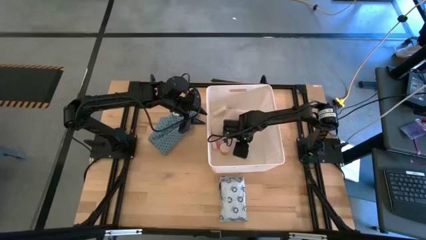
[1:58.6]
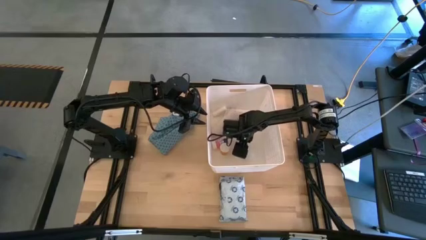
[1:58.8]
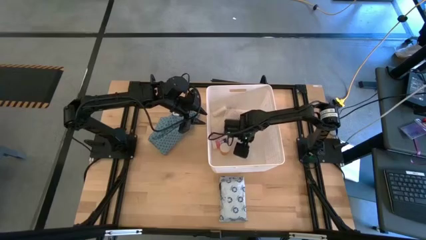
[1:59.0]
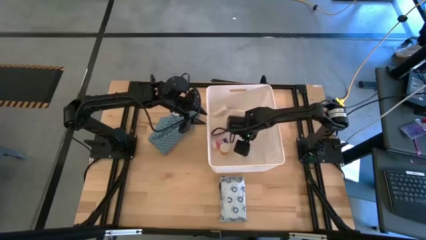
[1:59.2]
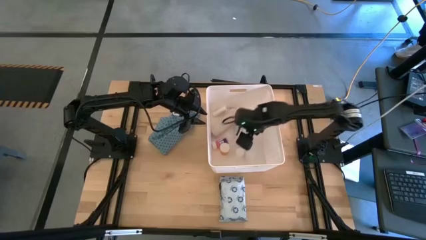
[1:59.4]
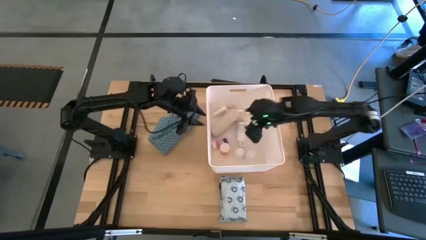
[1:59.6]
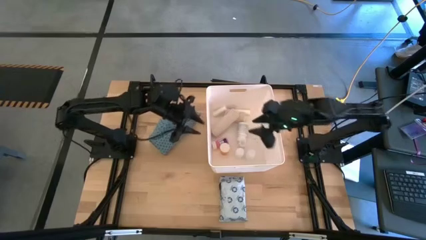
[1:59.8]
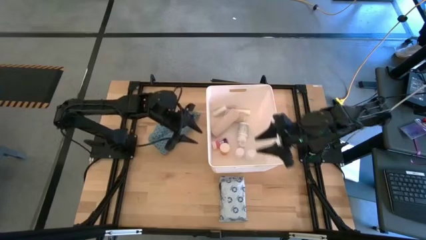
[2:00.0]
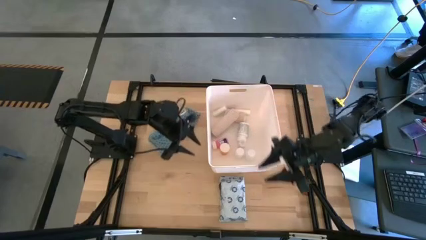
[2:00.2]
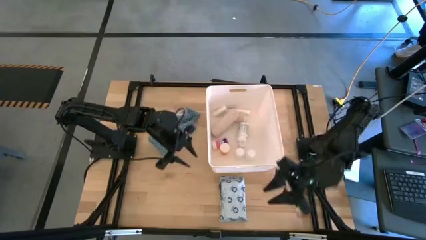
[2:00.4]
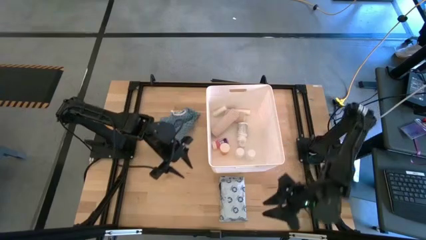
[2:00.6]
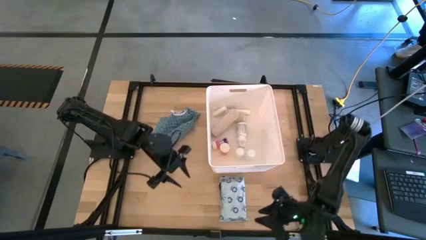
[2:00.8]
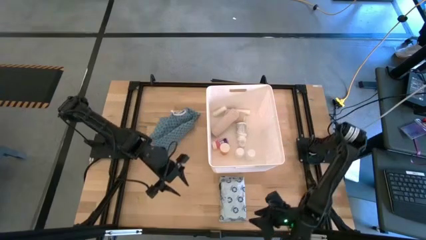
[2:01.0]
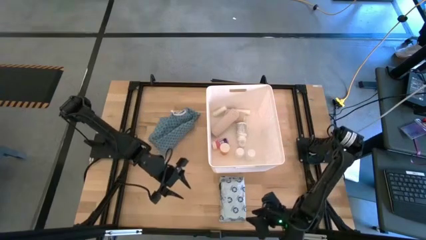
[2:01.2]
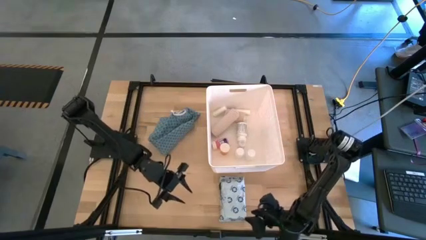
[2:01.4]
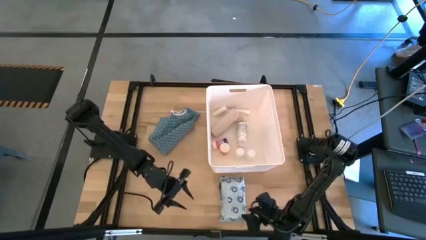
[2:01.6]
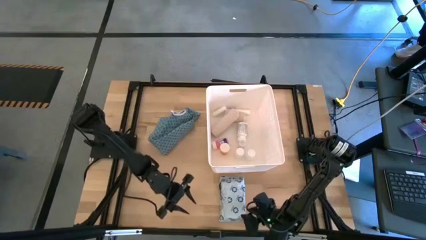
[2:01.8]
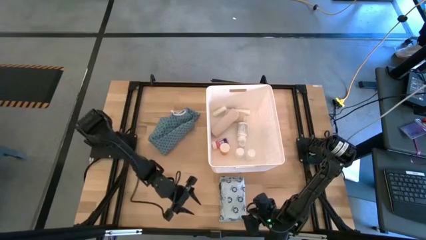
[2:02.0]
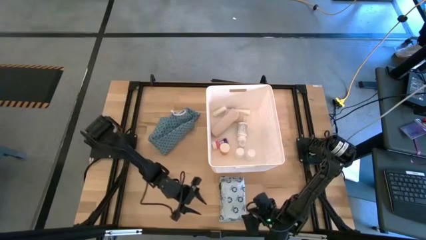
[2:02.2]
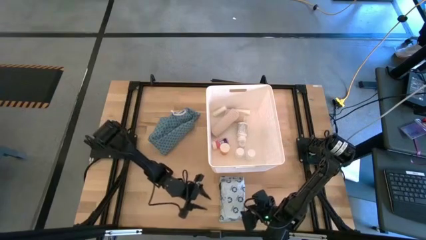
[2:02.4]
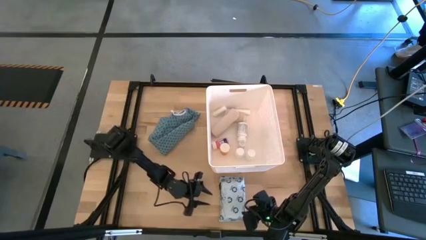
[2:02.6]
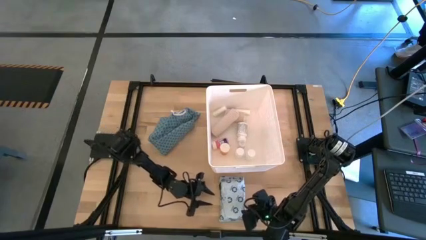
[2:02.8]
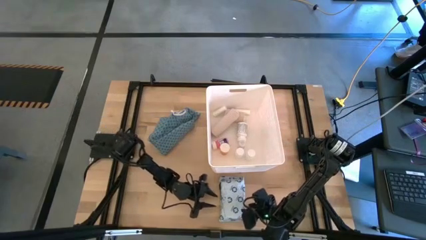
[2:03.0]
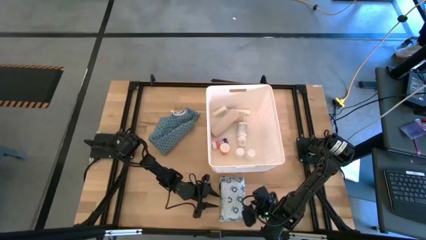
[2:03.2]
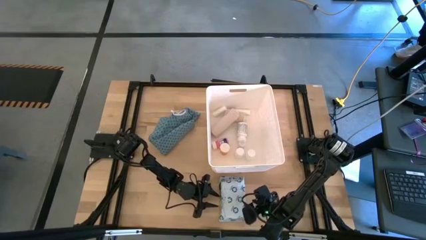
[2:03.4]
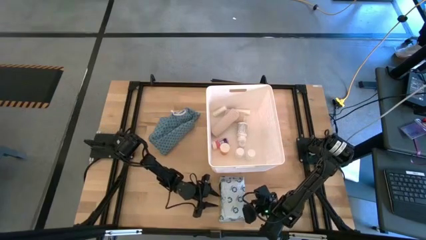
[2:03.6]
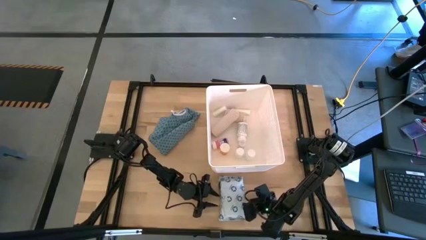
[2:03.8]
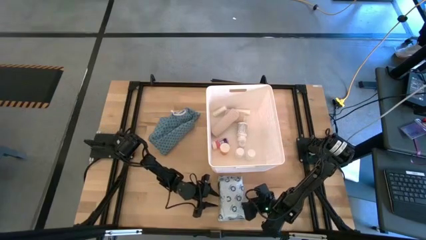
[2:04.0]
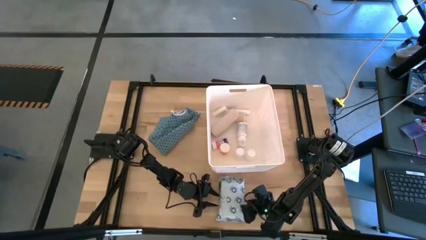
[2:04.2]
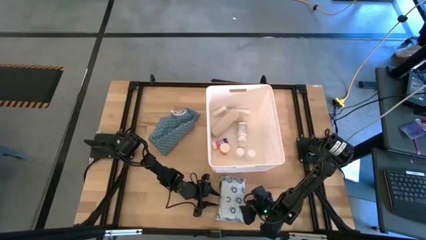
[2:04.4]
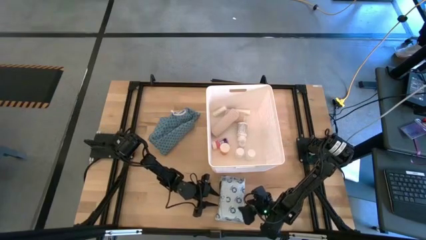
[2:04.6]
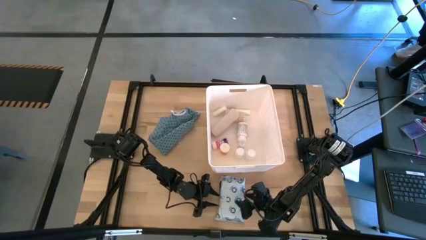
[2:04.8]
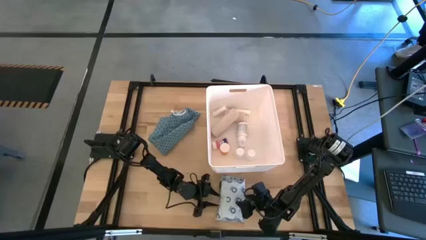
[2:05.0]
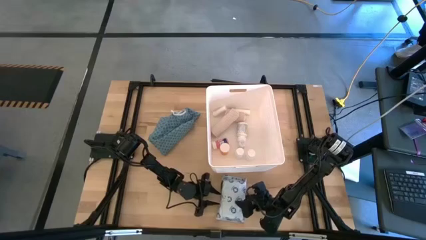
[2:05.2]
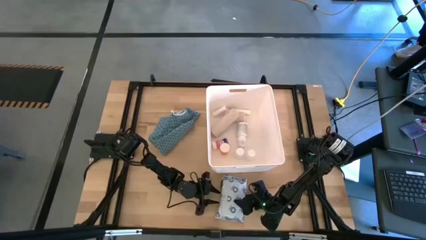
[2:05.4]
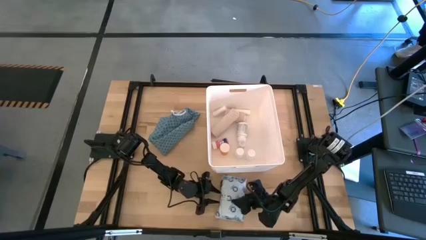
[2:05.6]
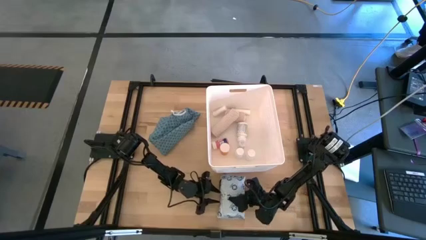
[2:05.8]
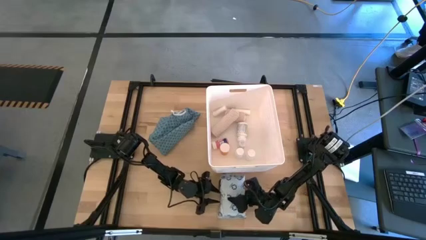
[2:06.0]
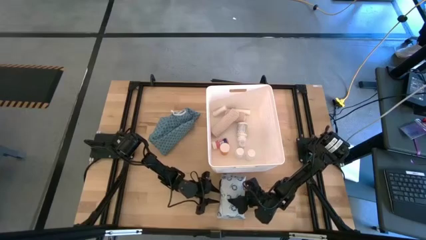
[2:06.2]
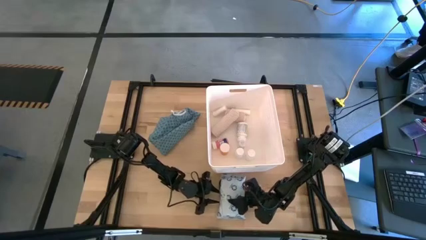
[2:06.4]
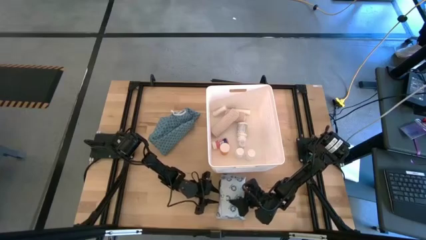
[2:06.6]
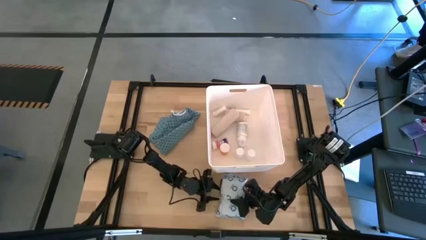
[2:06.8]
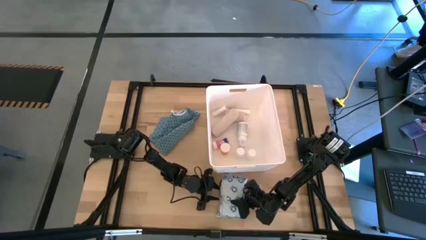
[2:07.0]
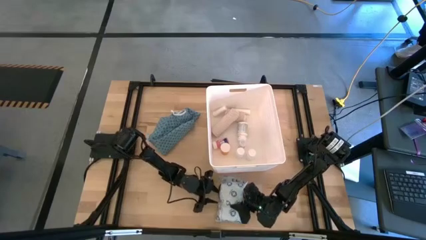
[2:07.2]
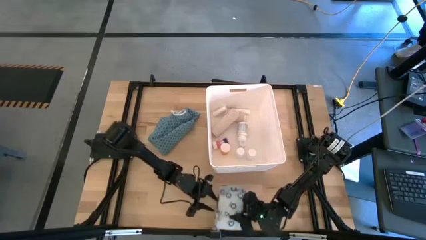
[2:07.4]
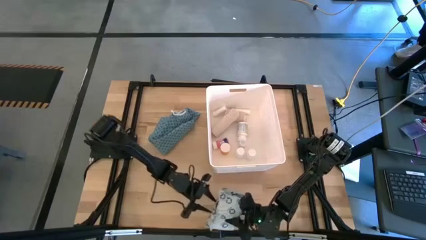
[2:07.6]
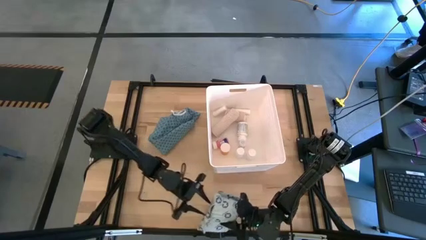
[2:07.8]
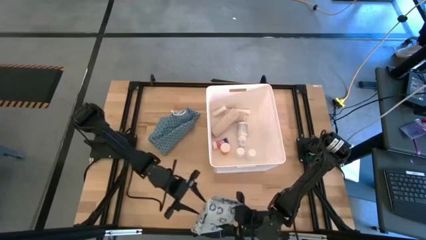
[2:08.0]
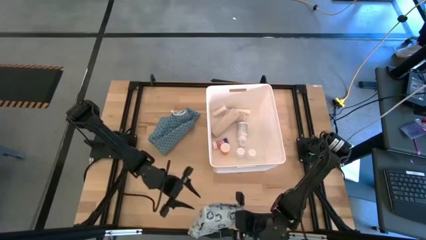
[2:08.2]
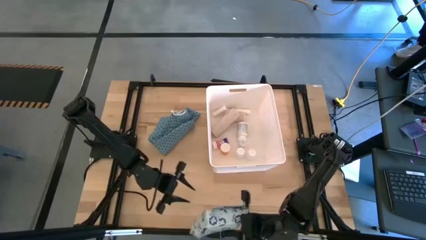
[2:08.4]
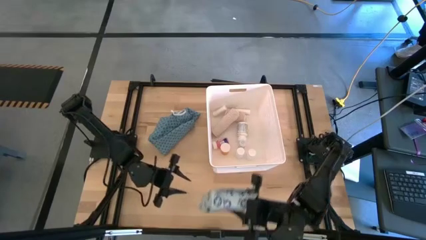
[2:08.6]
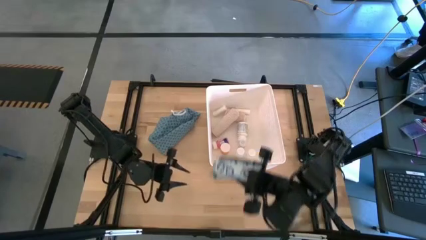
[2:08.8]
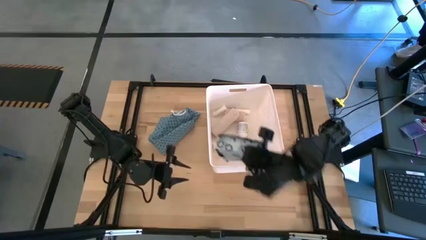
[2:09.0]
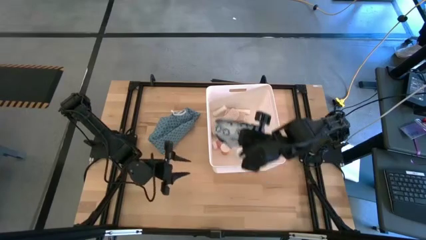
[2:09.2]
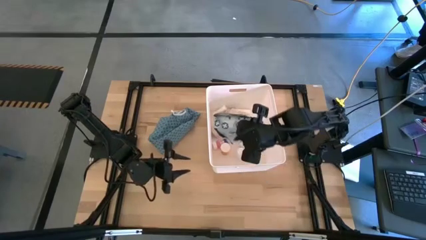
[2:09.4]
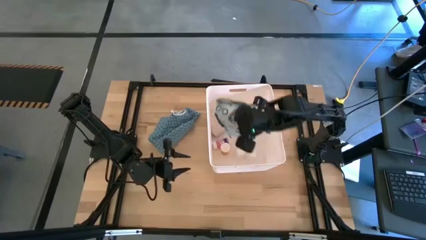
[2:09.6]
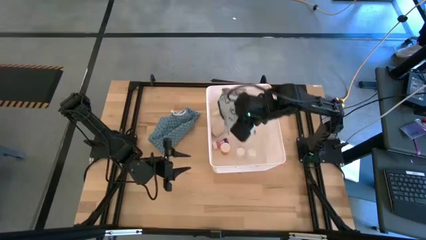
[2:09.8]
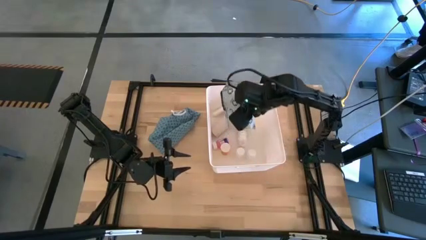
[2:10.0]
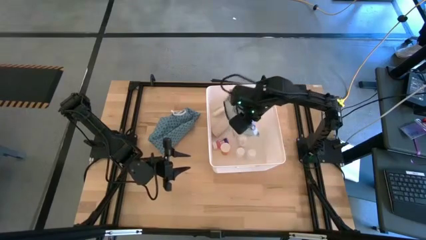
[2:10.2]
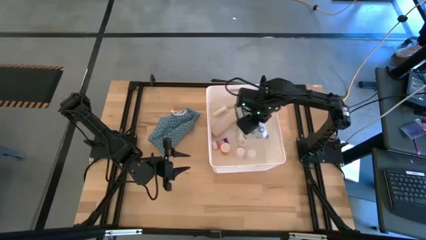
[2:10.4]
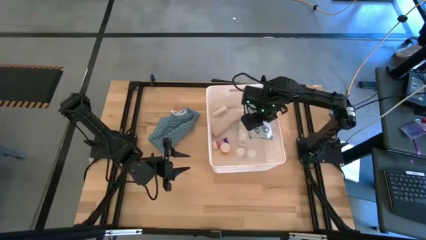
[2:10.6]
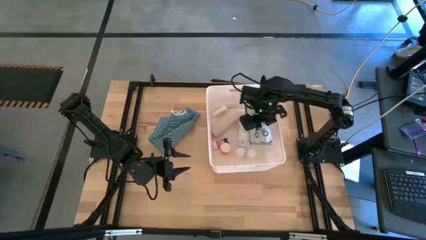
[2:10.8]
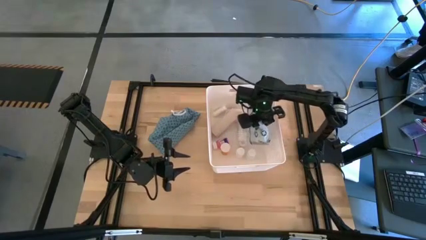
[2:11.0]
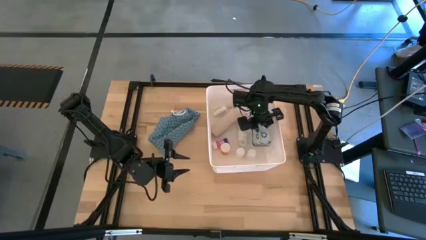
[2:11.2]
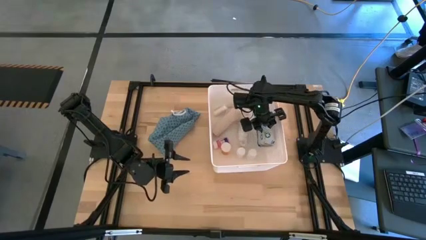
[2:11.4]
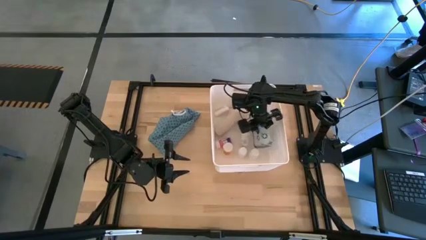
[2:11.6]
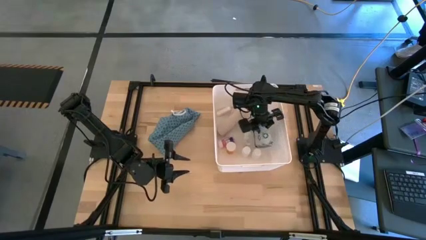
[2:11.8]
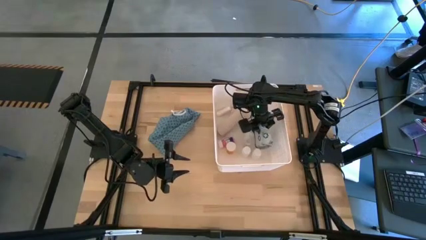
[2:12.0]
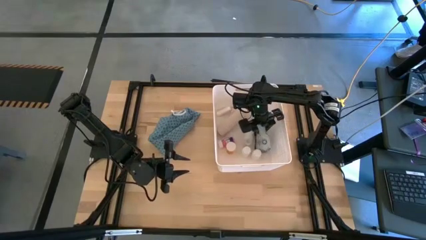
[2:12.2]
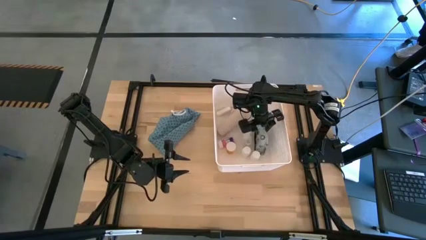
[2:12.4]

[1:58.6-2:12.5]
Task: Pick & place medical supplies in basket/bin
Put the white mailer bag into the white bin
